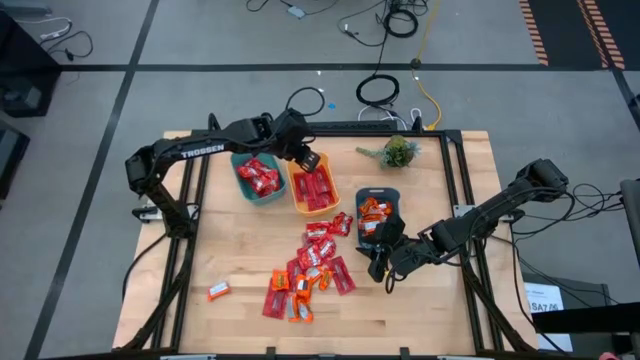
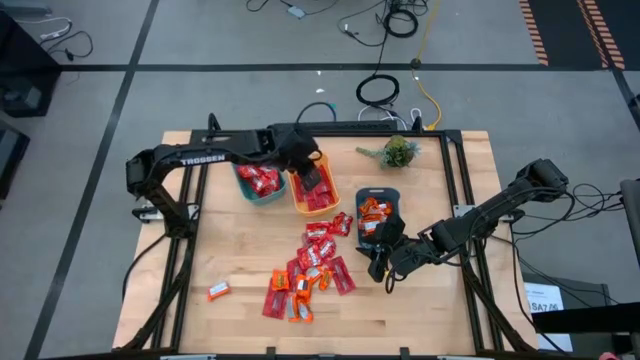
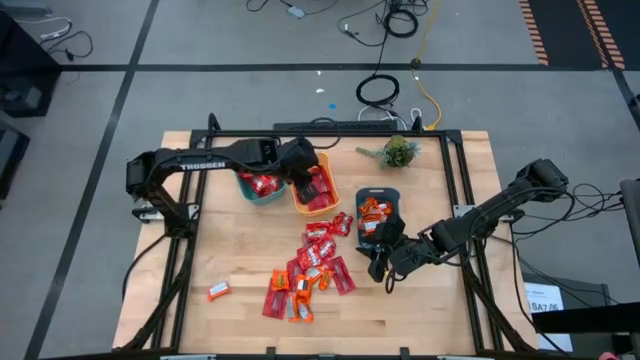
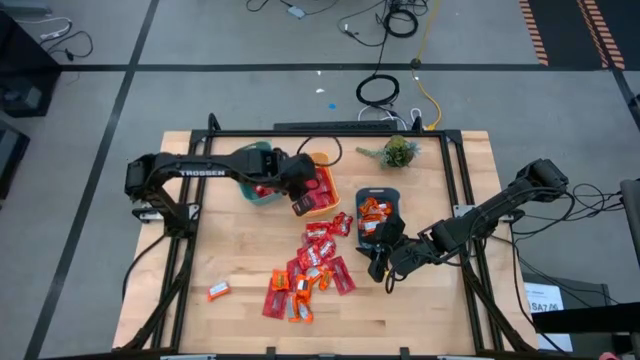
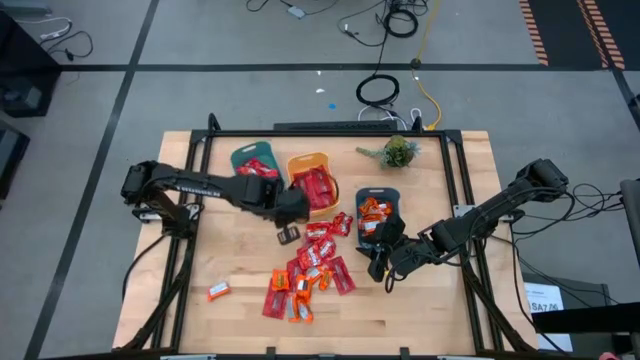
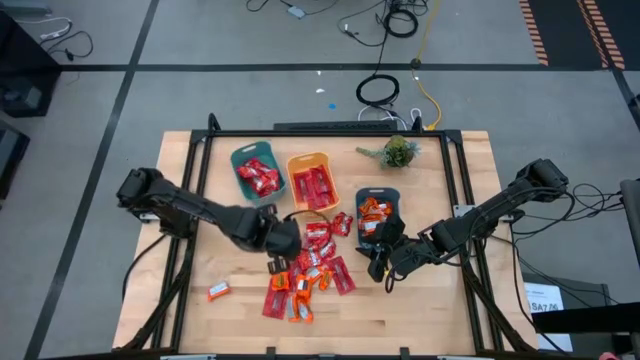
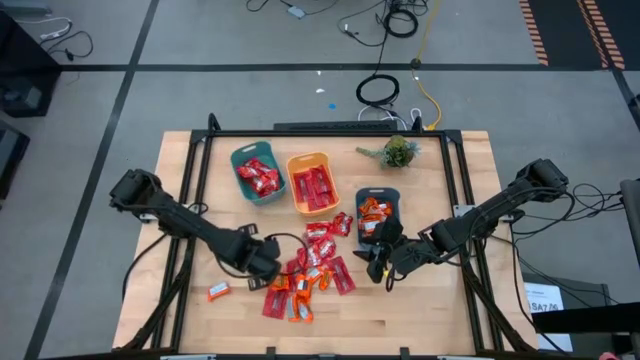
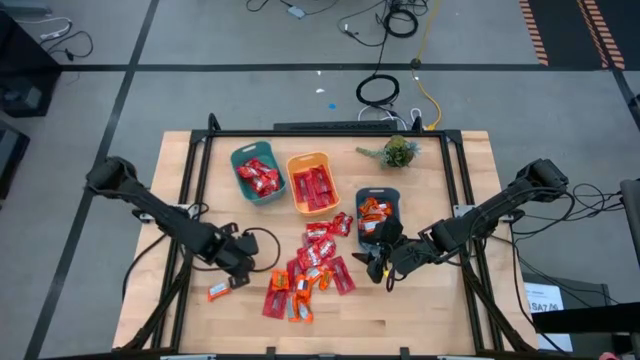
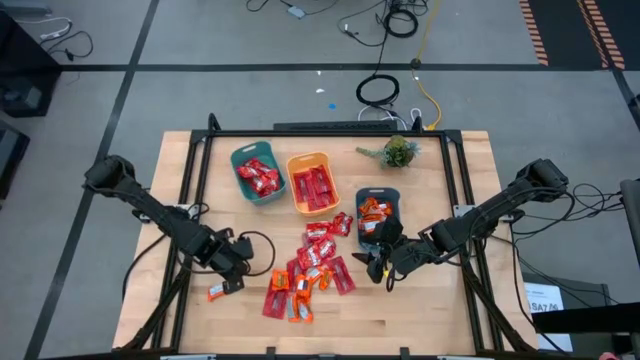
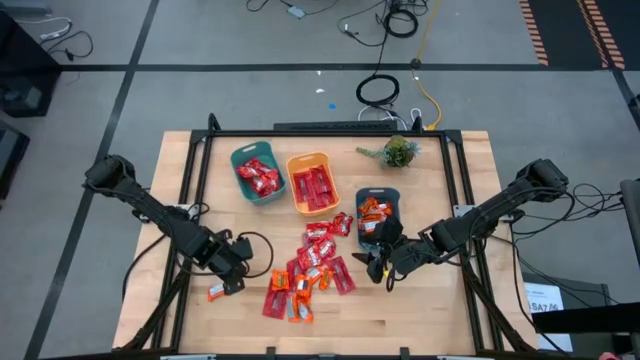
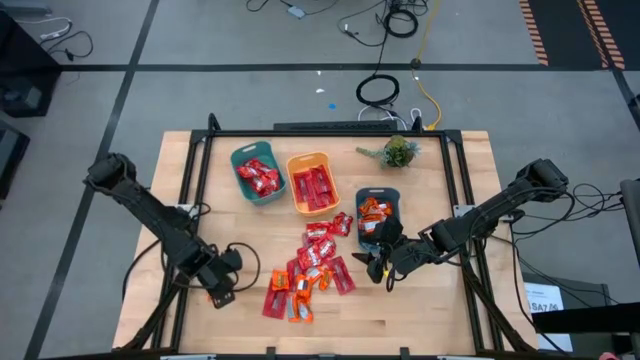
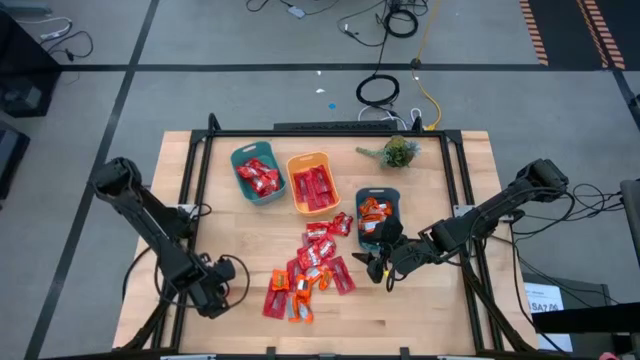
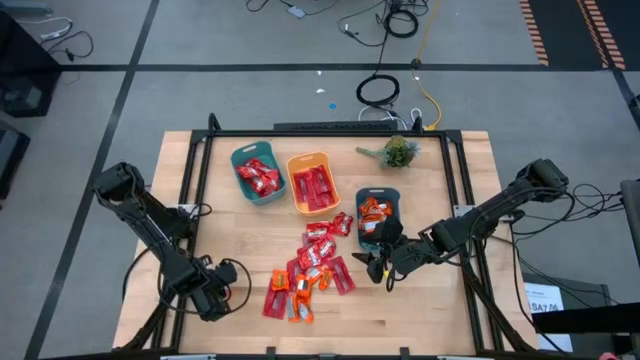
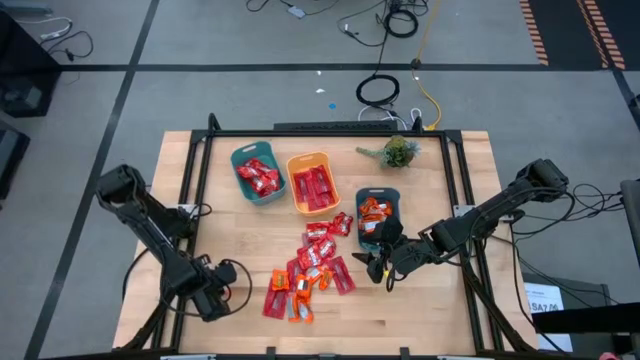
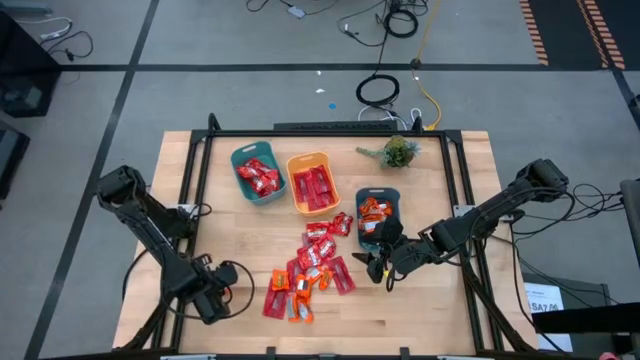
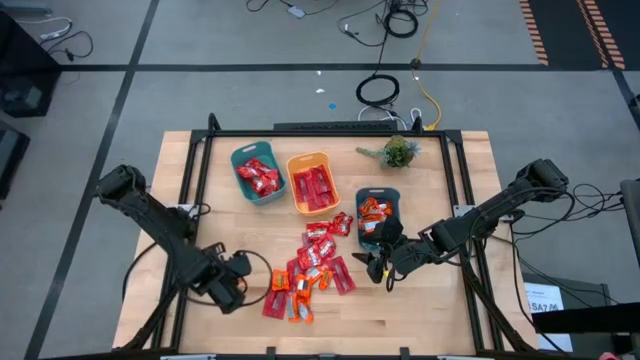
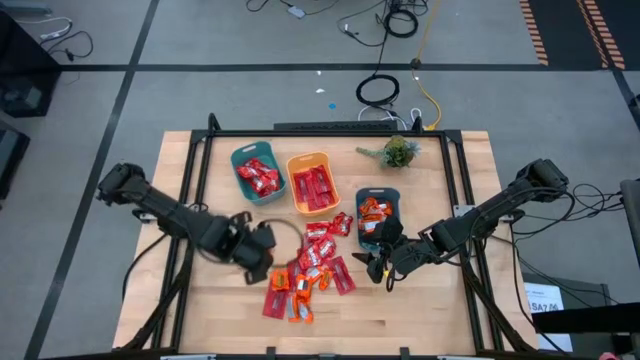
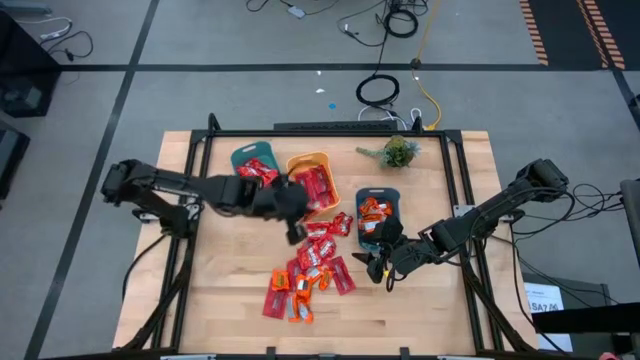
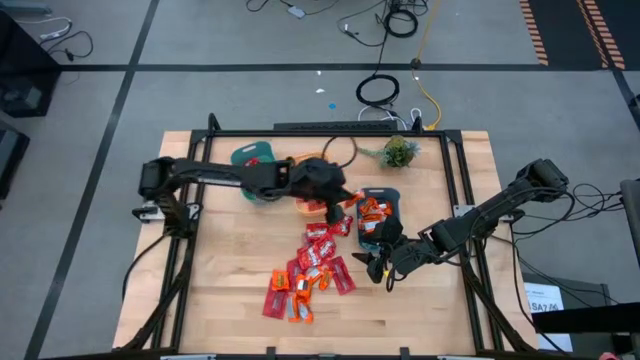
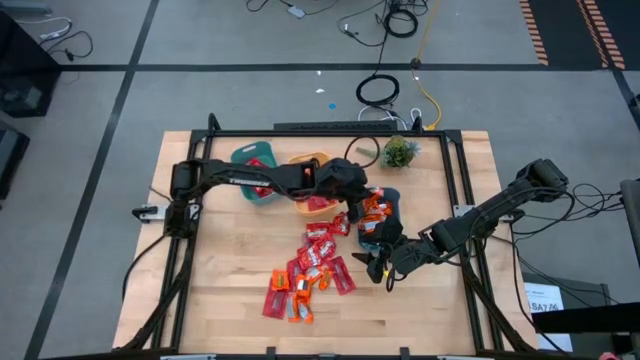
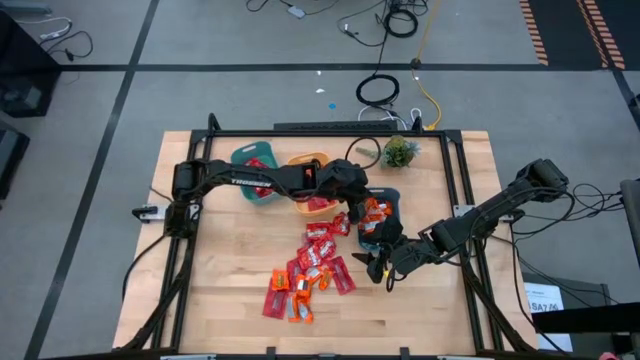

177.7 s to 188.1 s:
Task: Sort candy
Put the orange wrapper chocolate into the dark blue bin

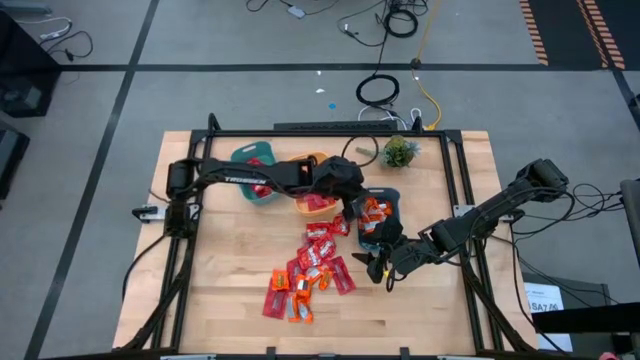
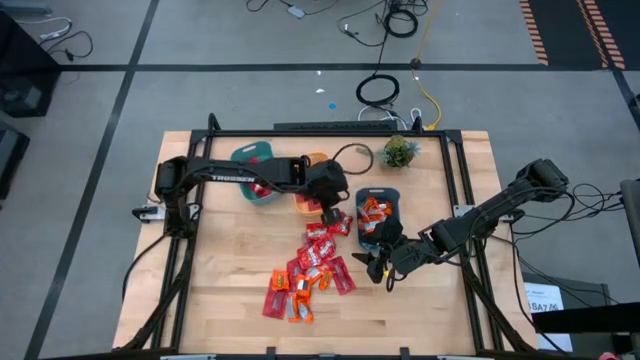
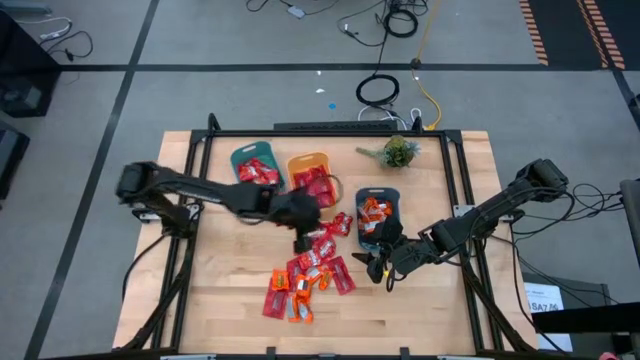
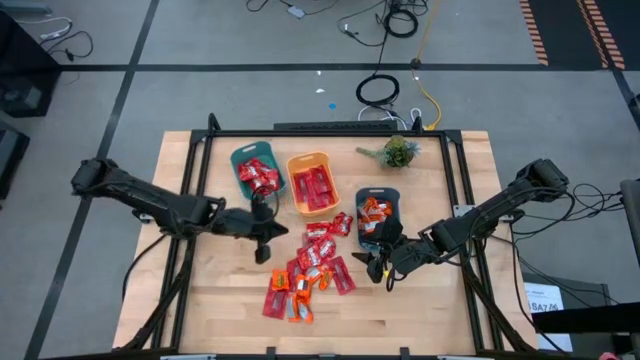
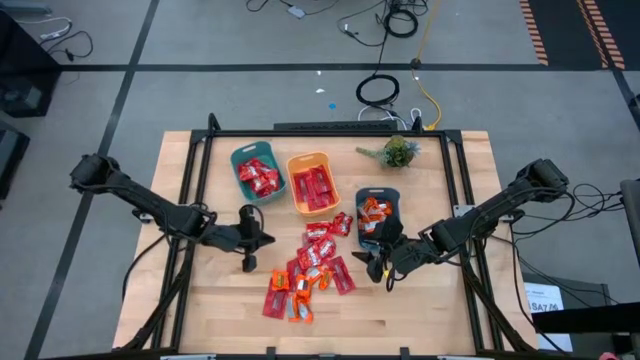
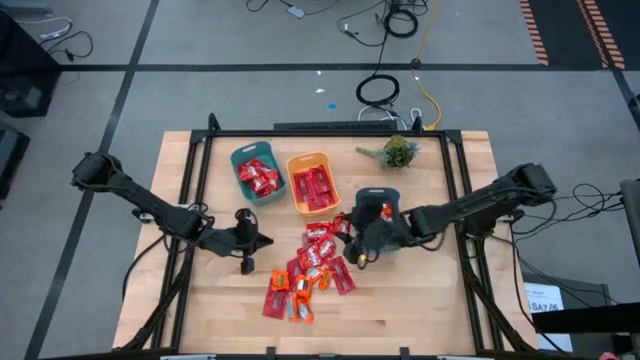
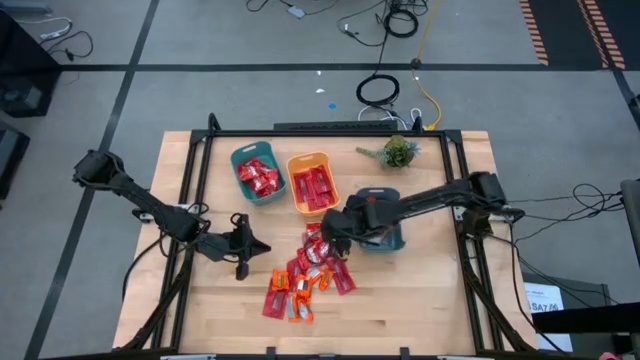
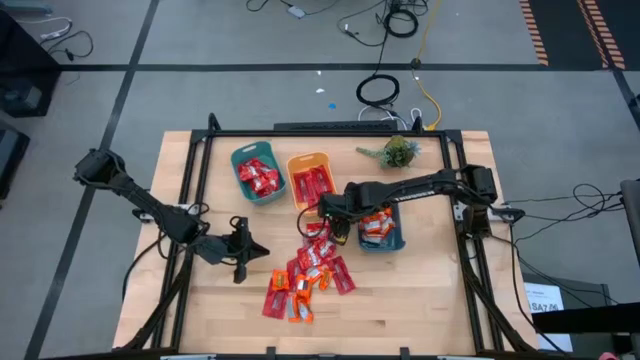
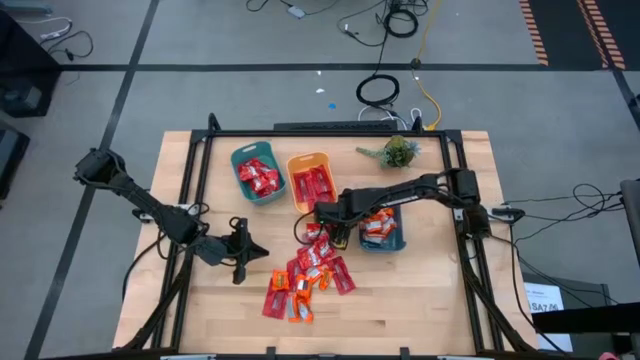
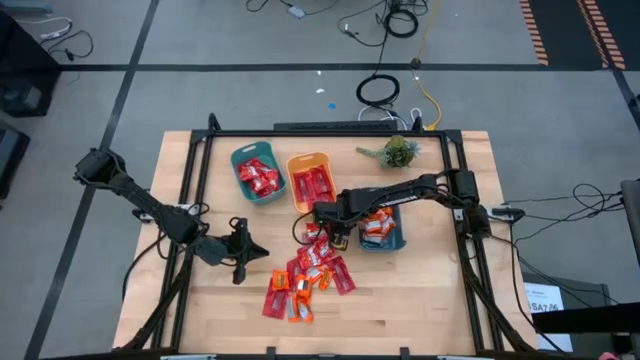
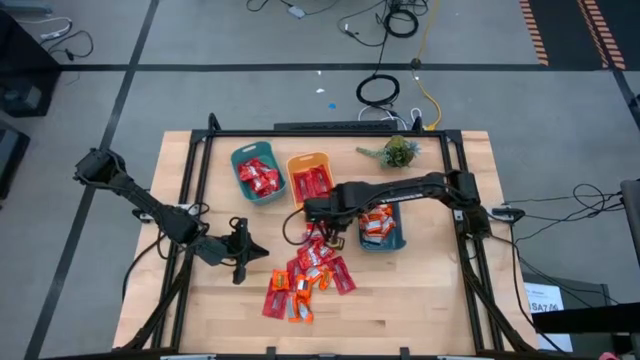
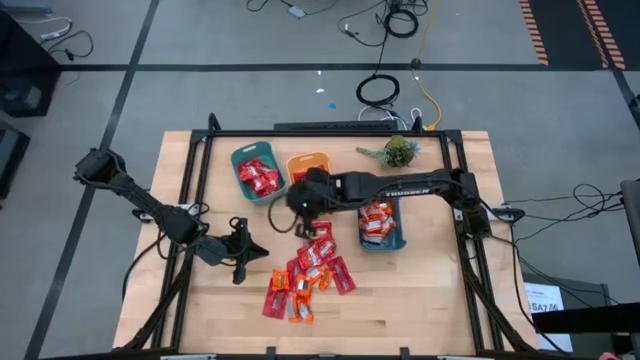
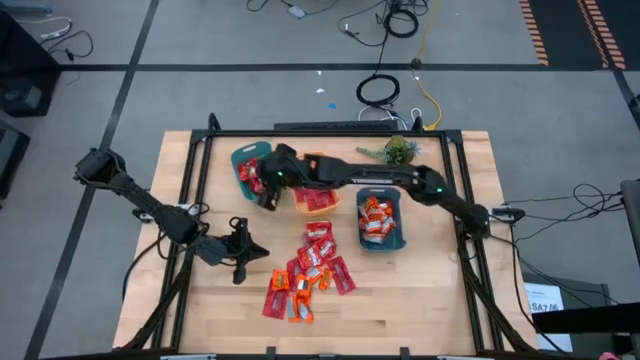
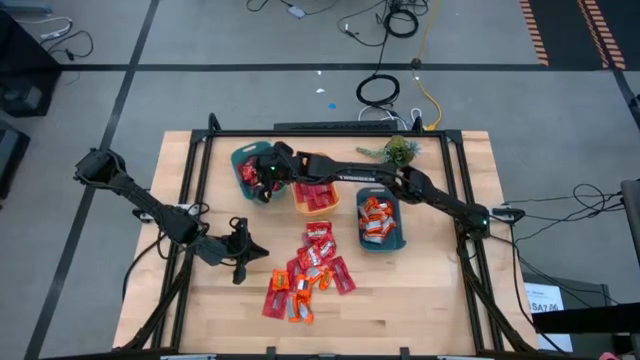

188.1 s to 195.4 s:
Put the red pack of candy into the light blue bin

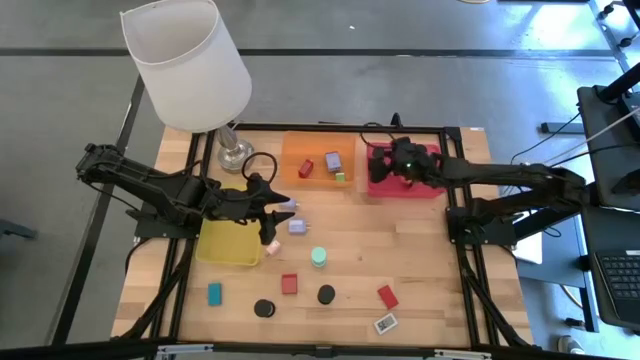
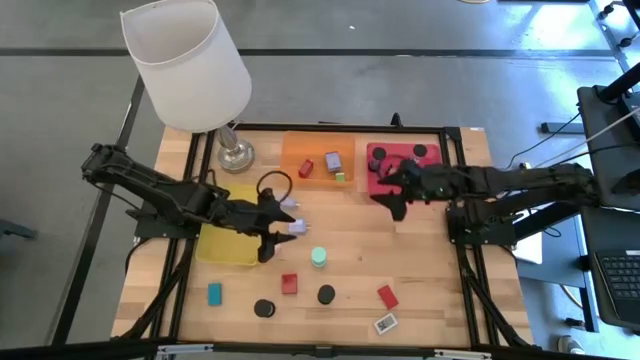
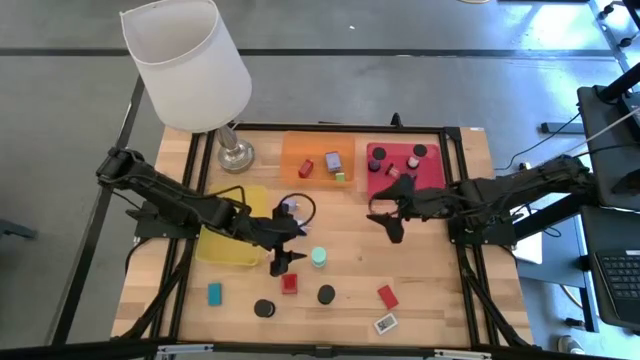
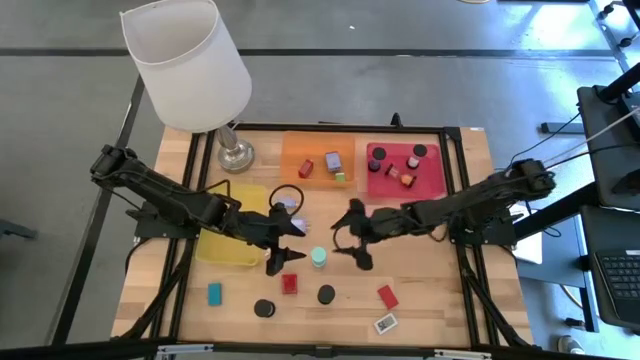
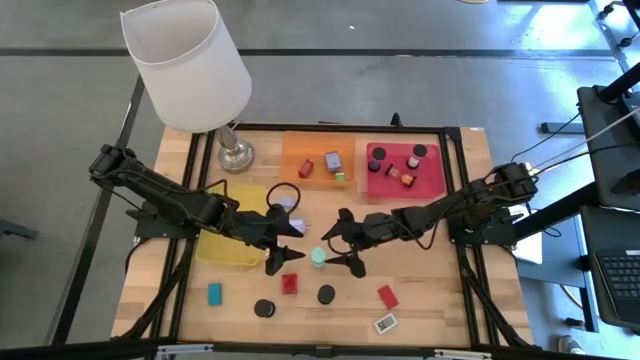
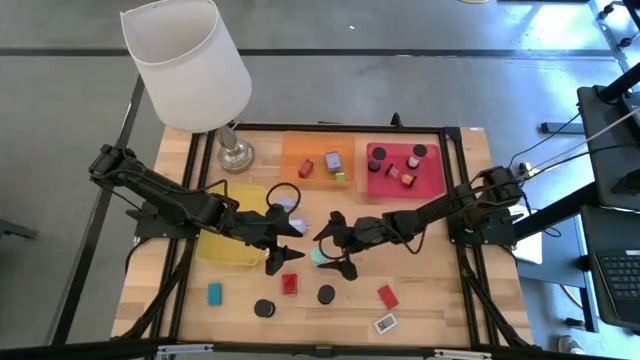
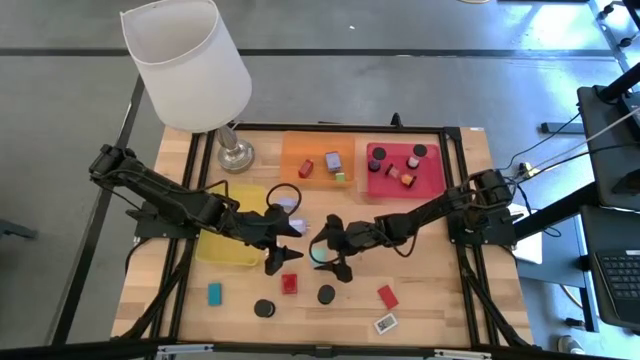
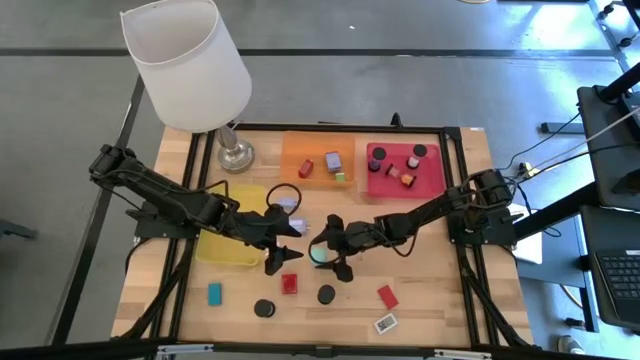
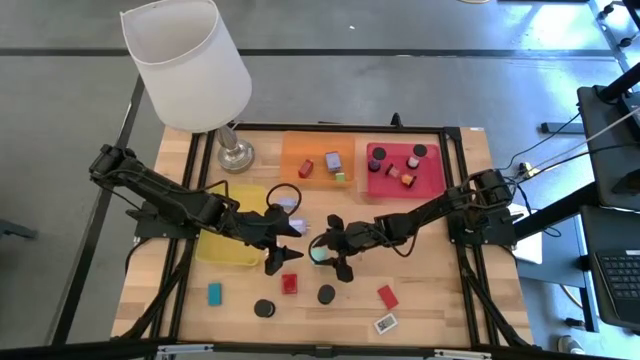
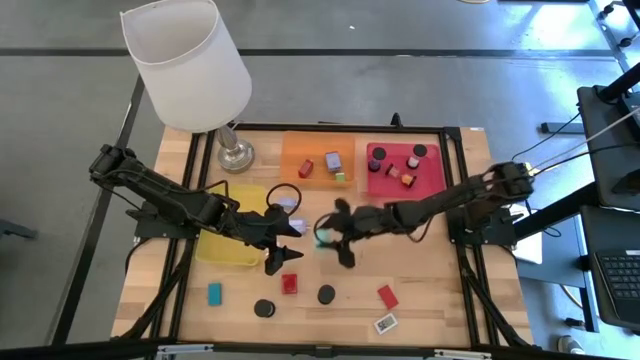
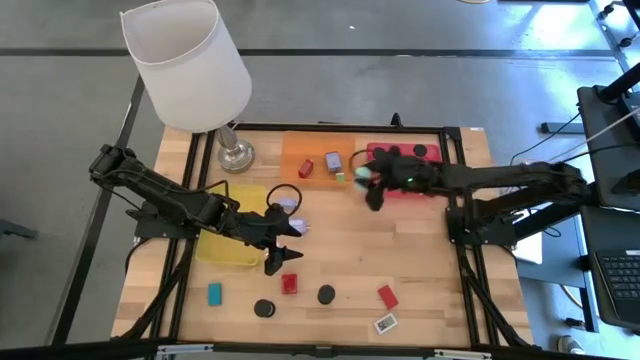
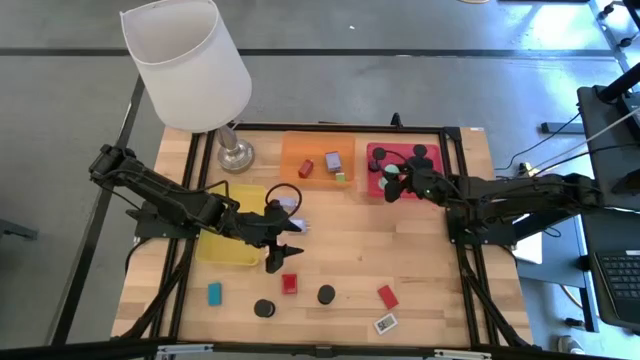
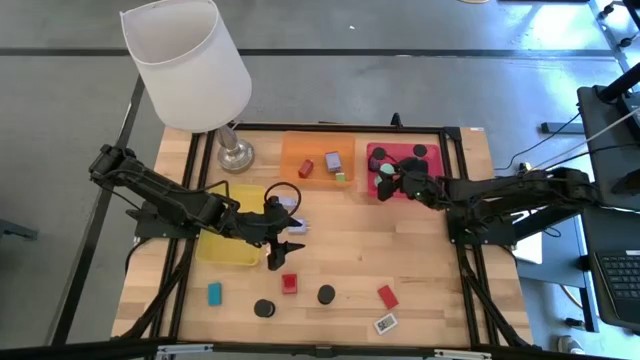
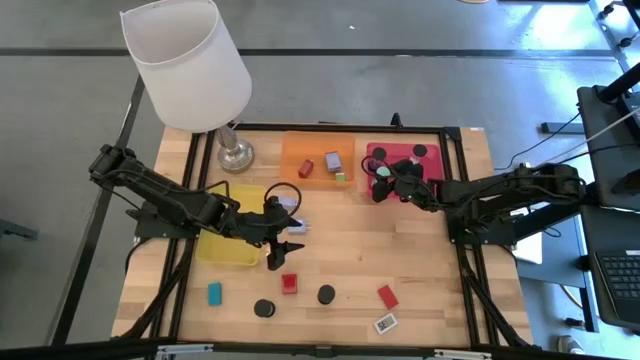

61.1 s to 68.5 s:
Task: Pick & Place Office items
Put the light blue hourglass into the pink bin
